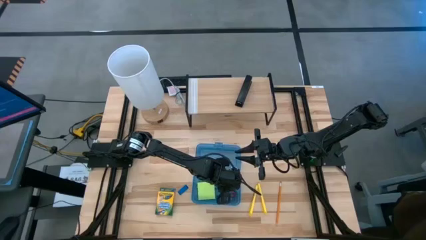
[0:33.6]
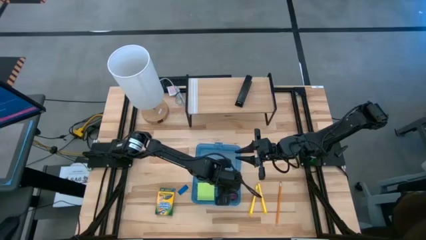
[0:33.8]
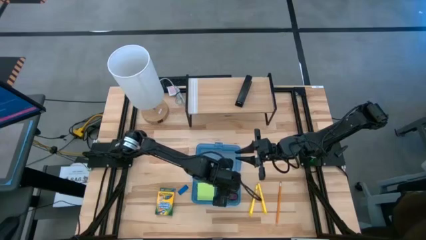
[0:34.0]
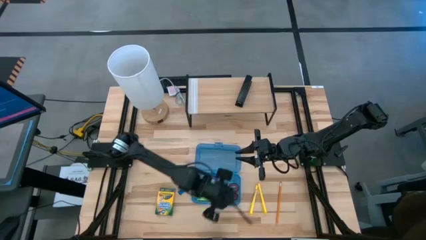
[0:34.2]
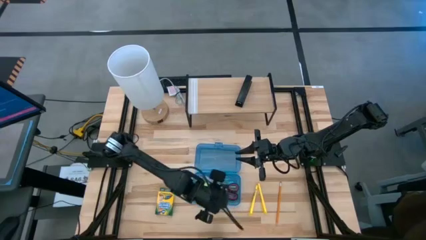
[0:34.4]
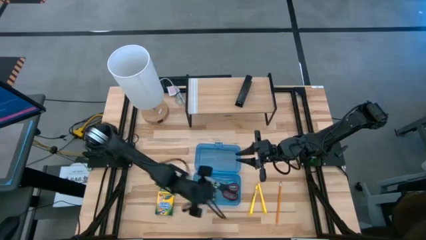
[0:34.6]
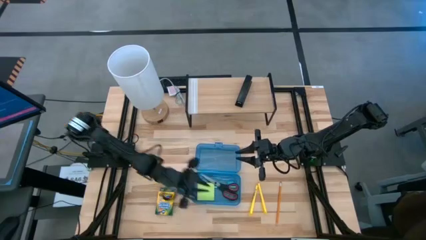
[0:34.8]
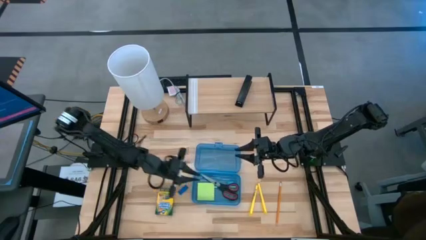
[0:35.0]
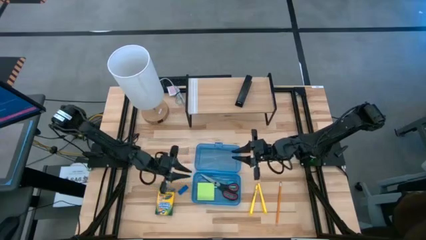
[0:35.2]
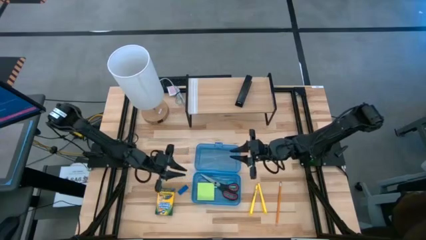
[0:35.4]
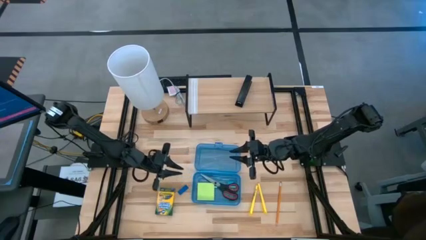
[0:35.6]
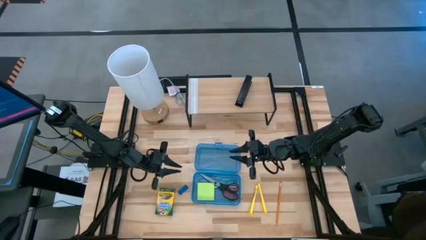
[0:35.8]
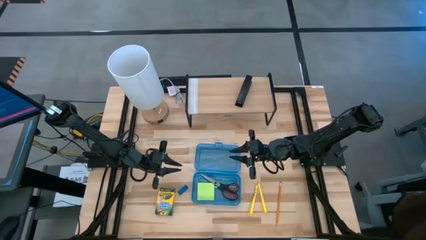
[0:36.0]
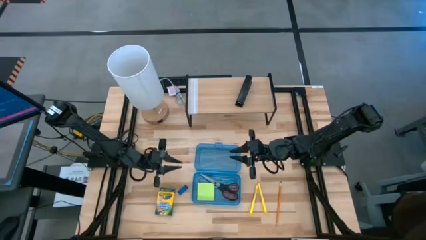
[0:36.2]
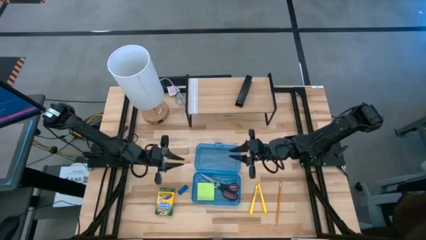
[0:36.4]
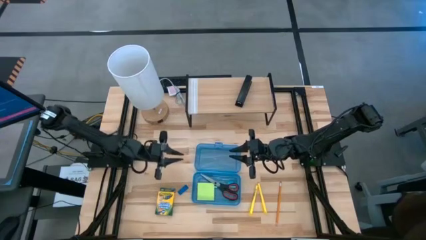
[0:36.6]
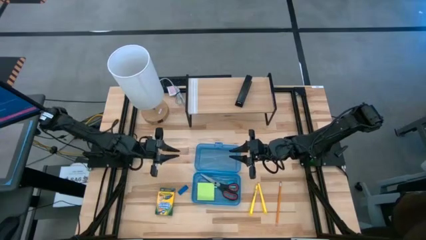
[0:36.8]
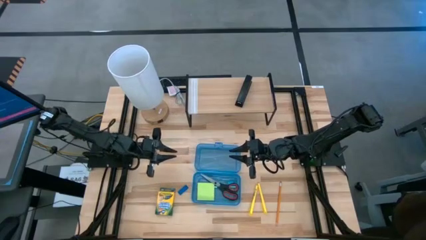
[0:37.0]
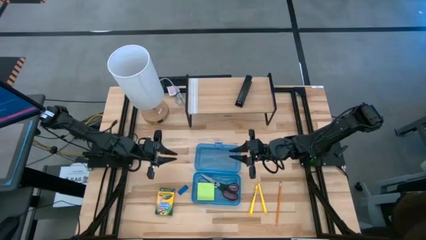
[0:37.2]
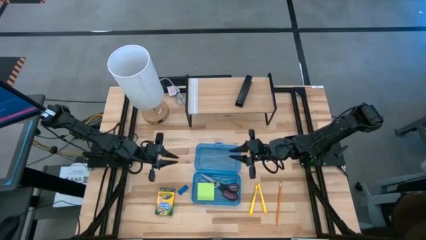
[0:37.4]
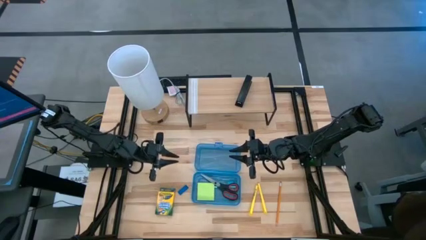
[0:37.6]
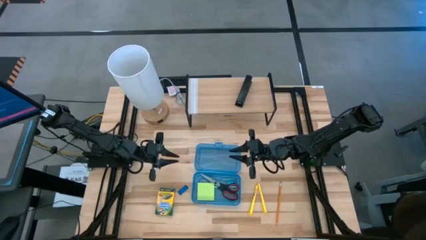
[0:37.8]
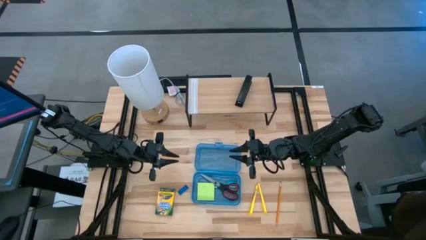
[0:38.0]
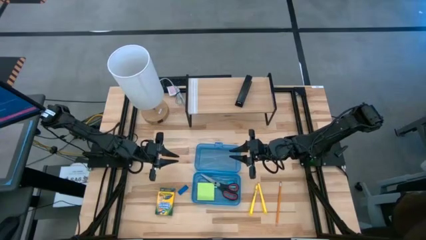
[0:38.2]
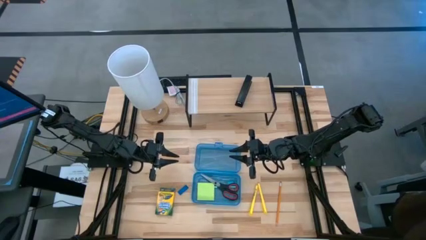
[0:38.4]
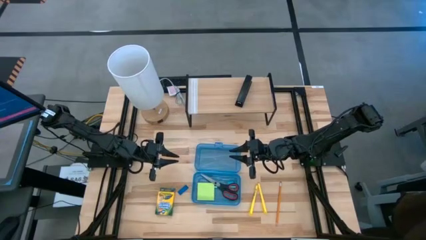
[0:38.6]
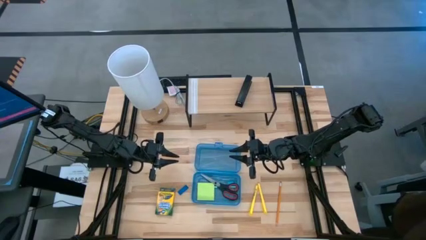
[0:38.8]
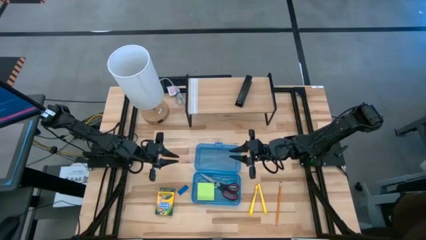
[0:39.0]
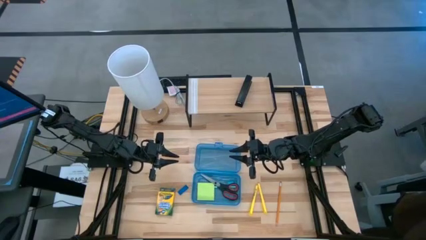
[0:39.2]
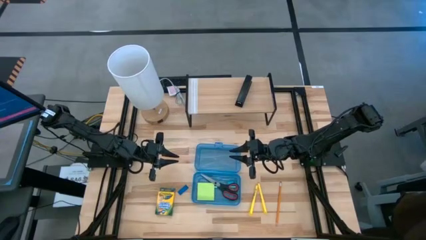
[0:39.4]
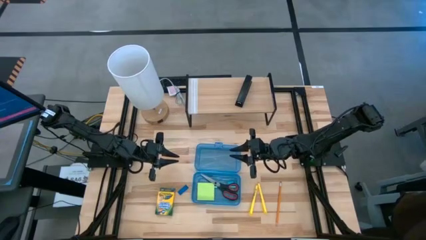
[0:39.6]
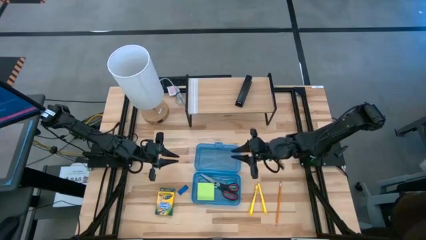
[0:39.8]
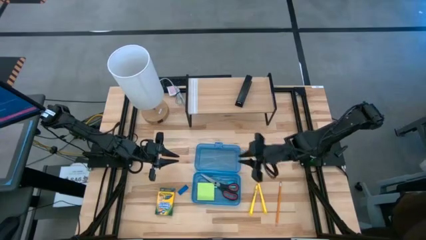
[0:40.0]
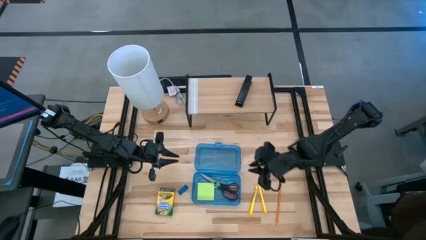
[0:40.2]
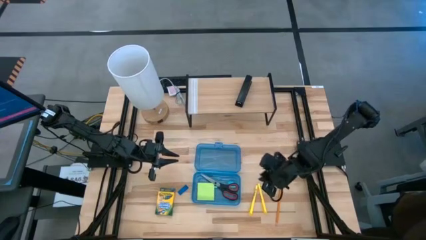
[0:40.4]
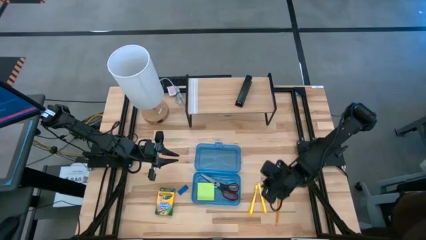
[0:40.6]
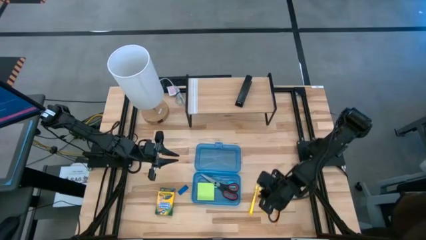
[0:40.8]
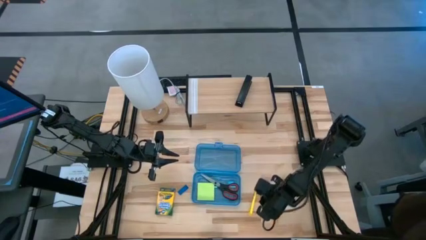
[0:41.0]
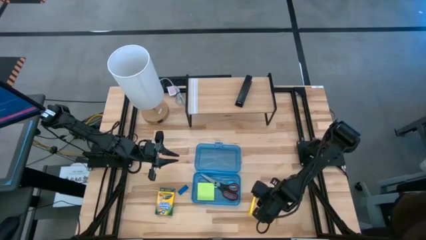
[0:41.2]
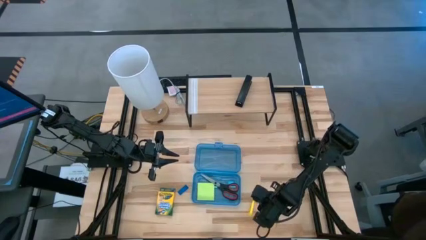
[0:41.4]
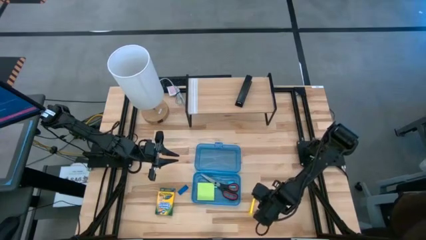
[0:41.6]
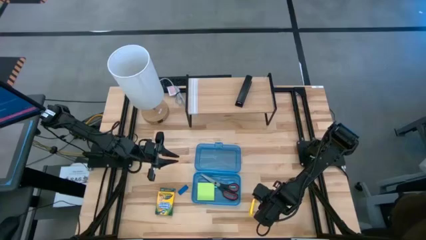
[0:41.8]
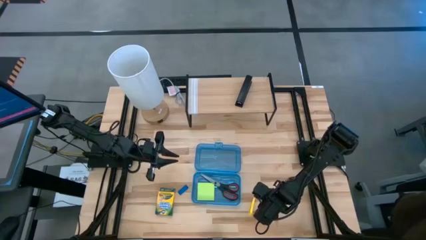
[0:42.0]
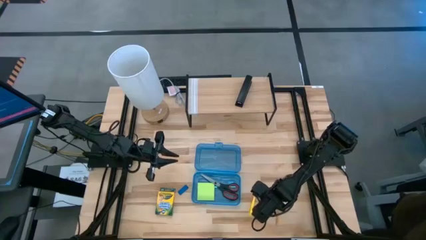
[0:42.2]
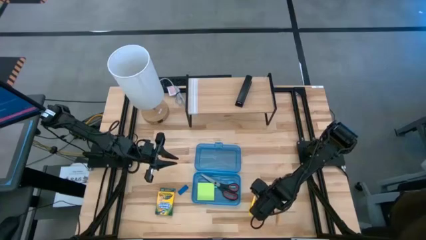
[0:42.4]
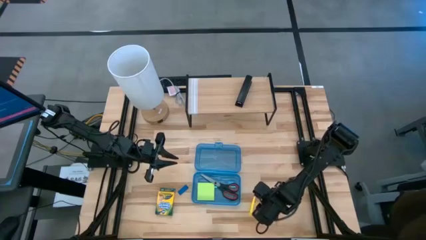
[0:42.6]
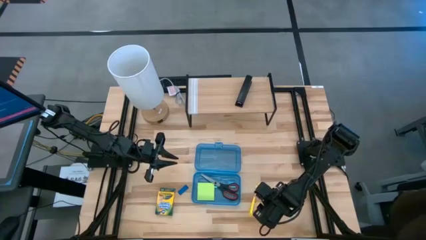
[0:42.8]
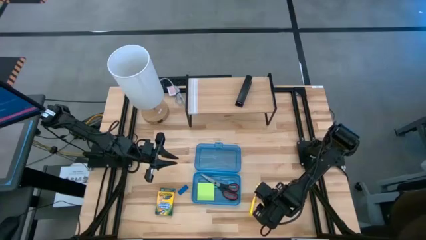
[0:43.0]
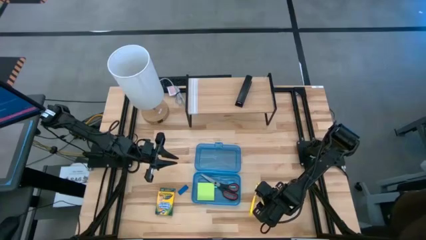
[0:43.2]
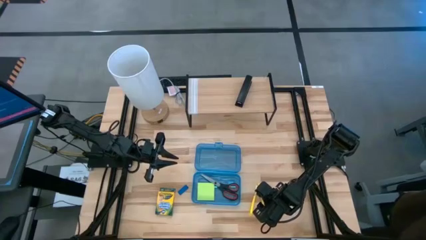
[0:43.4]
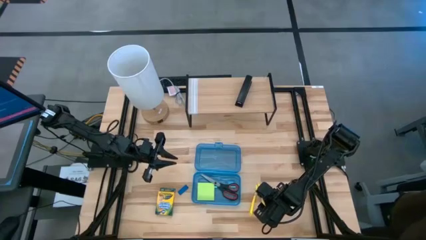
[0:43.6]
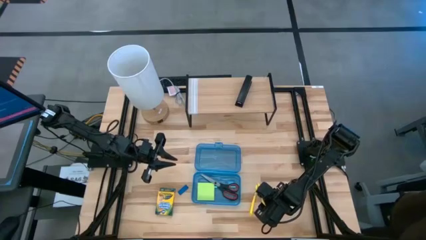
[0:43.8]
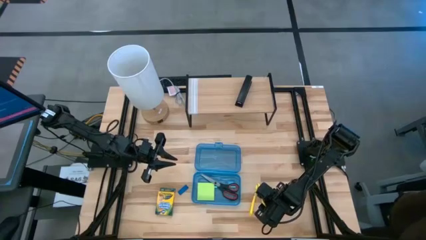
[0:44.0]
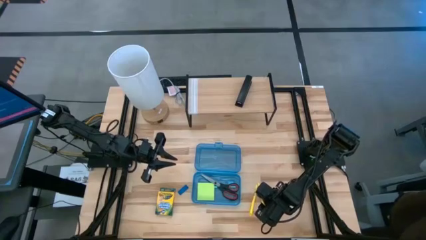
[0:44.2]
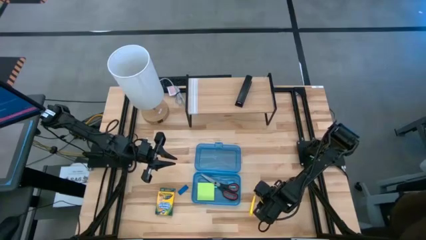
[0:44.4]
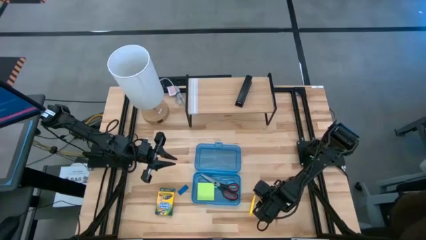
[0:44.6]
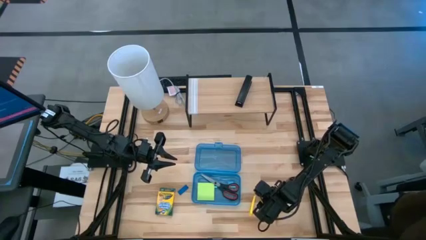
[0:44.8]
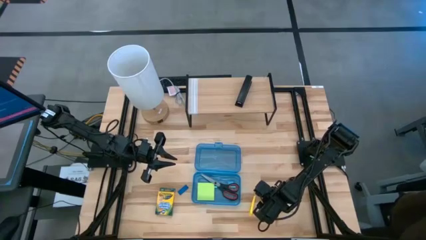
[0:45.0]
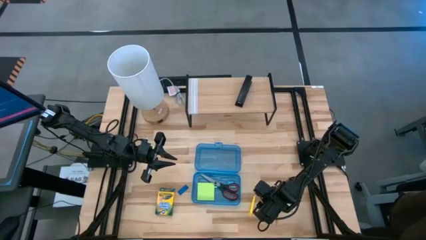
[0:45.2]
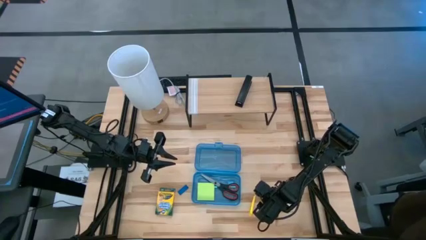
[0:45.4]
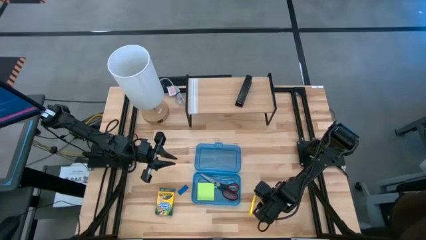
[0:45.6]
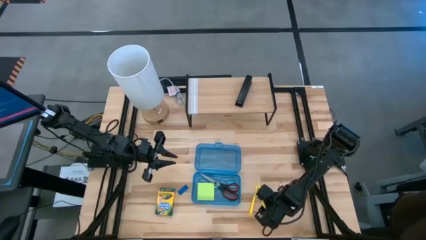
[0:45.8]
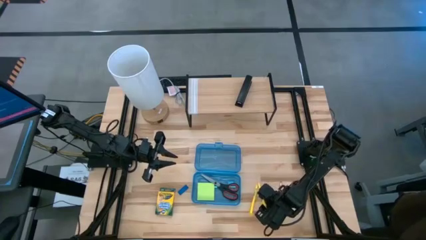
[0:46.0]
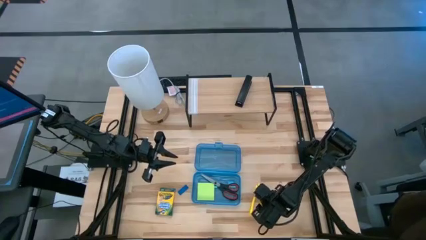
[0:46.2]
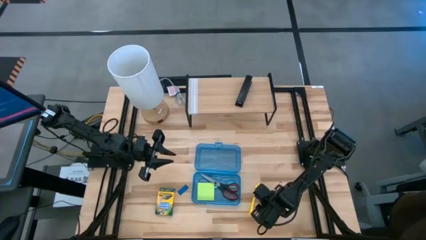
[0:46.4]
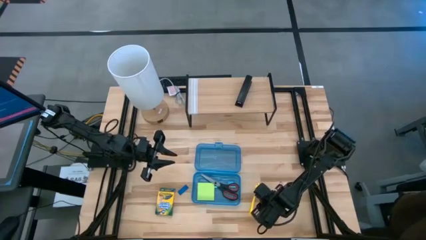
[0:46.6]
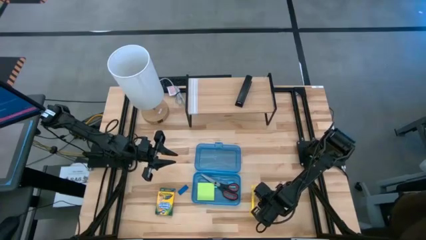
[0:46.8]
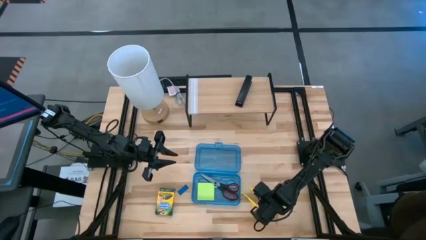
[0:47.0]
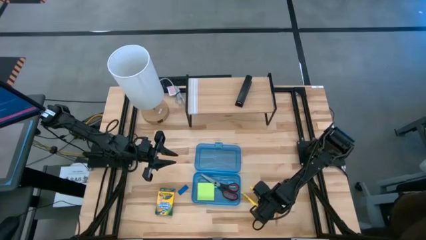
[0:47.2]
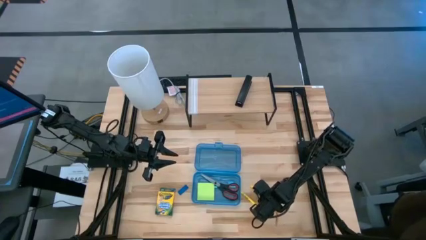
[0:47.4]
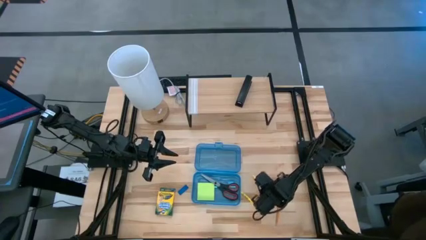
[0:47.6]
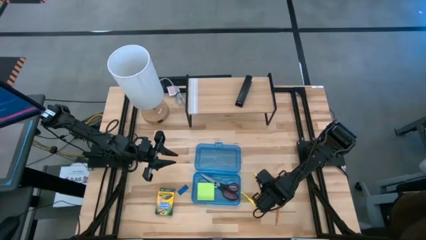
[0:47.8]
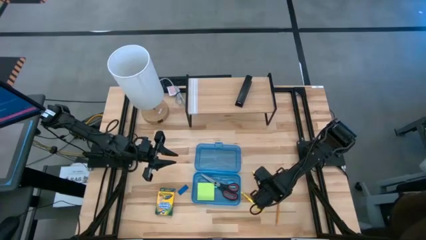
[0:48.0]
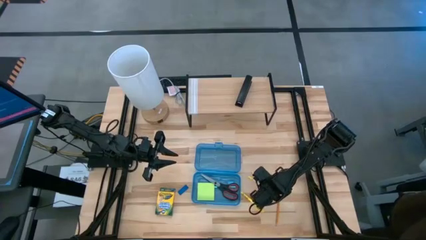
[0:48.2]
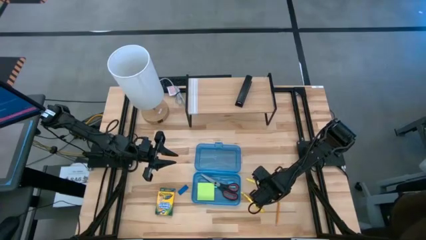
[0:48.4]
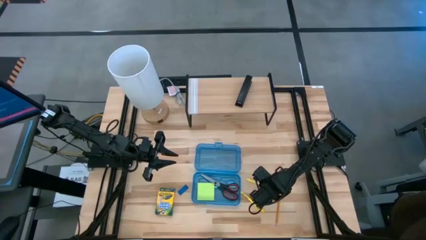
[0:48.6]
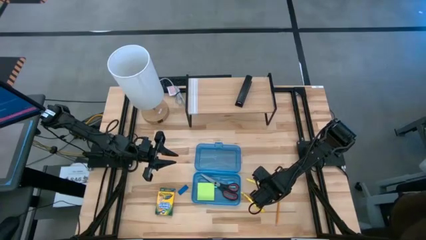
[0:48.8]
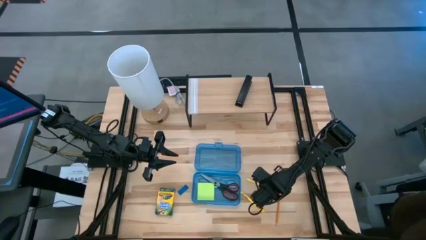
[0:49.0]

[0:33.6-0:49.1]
Task: Pack school essentials
Put the right yellow pen into the blue supply box

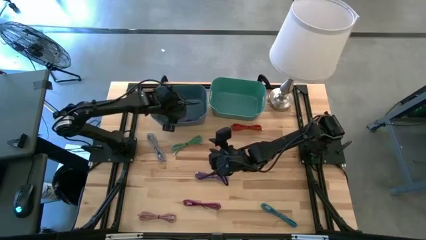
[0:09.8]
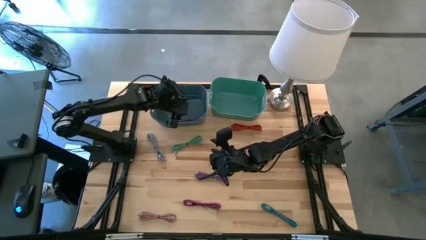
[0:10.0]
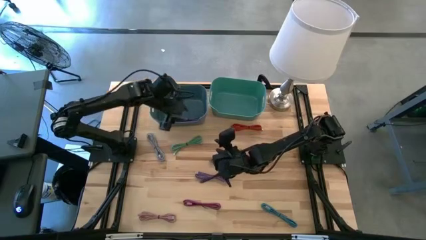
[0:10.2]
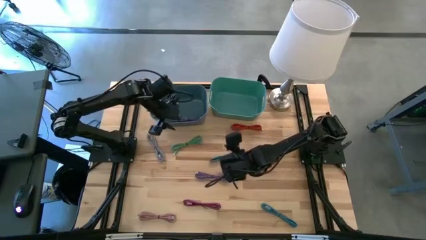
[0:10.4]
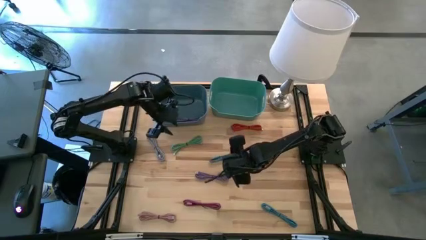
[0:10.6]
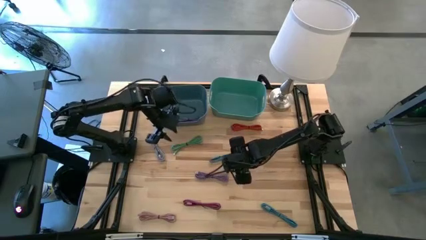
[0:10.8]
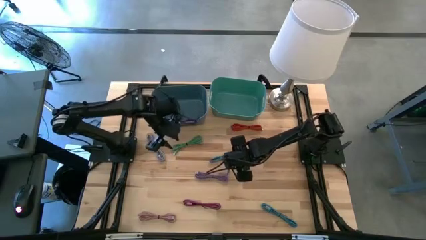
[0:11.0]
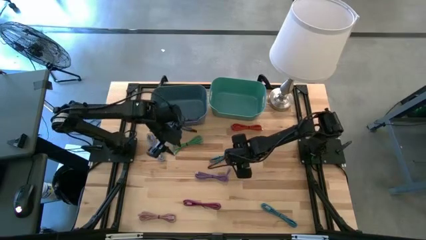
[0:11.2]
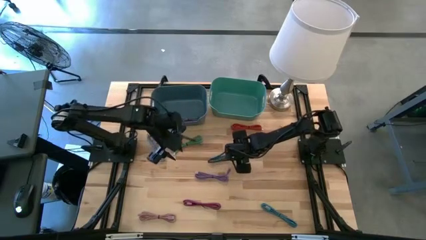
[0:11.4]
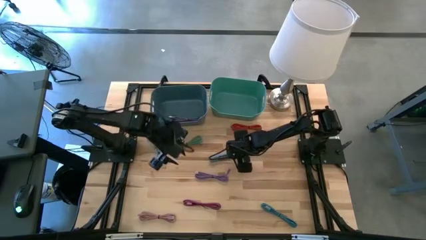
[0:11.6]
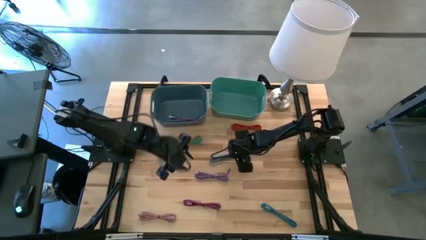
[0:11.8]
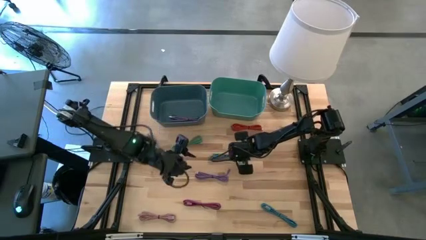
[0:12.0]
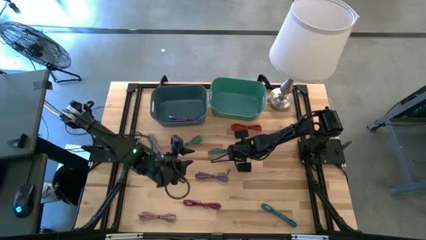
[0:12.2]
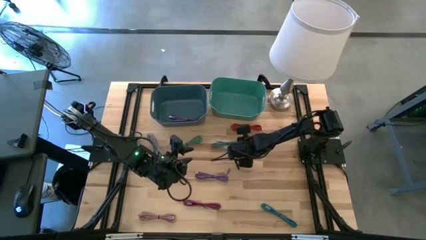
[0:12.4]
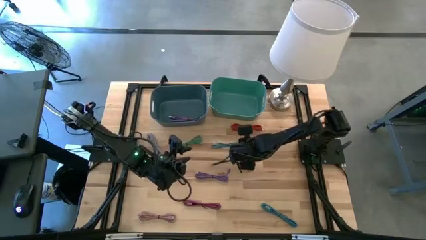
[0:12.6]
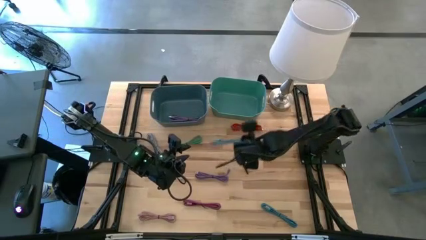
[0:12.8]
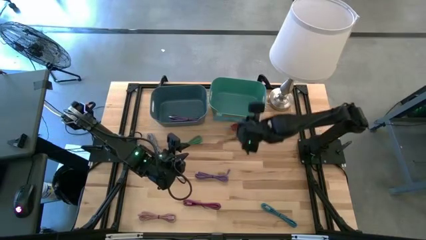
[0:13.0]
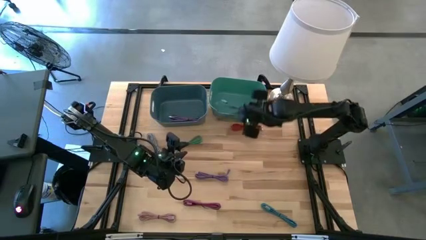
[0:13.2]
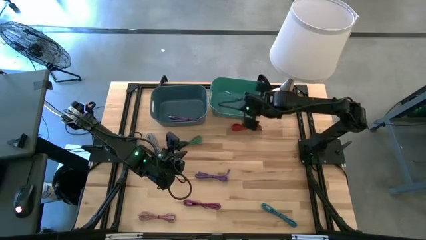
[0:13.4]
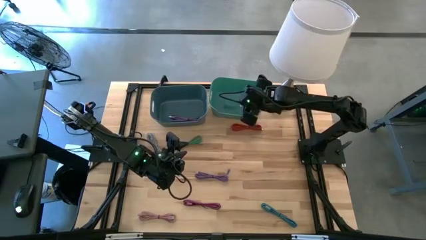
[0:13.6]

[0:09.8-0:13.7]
Task: Pick & Place USB Port
Put the black and blue charger cable into the green bin
